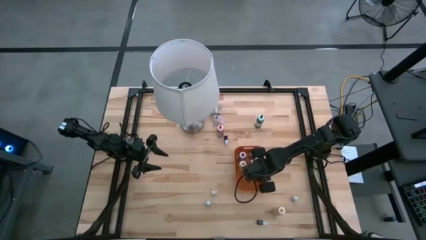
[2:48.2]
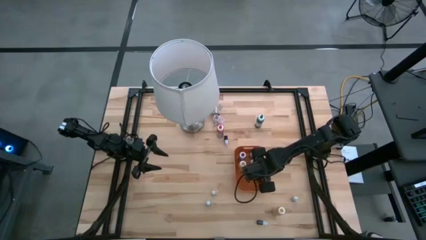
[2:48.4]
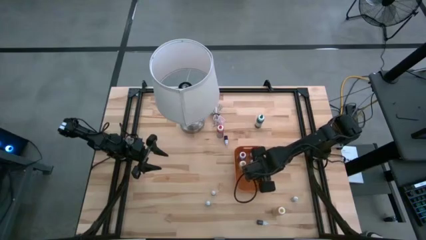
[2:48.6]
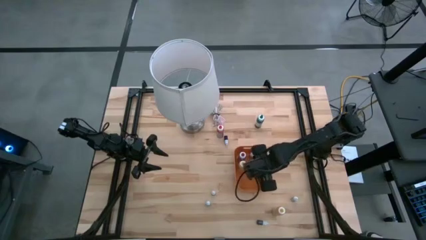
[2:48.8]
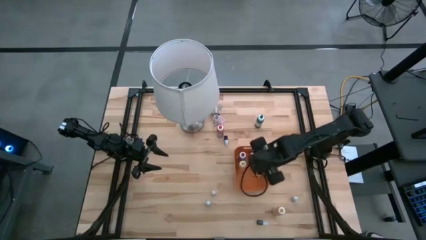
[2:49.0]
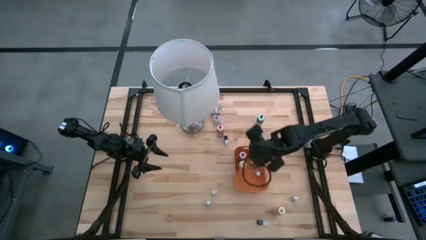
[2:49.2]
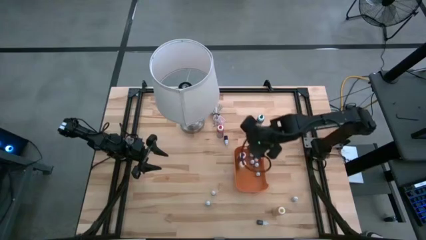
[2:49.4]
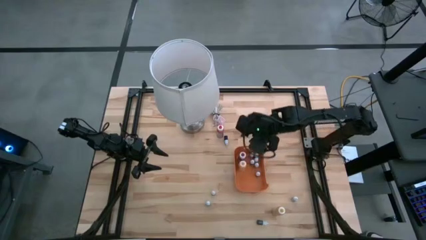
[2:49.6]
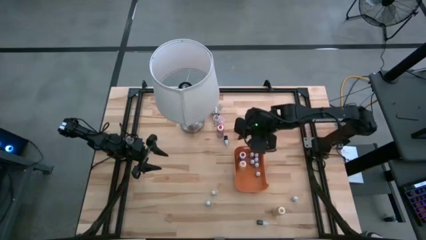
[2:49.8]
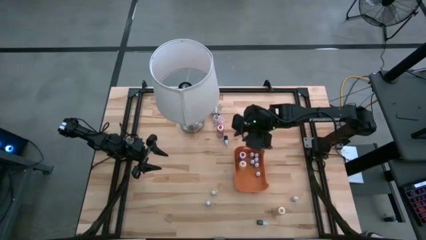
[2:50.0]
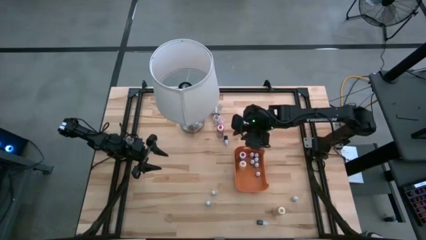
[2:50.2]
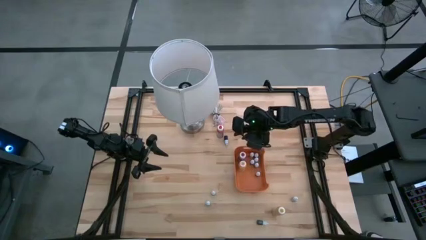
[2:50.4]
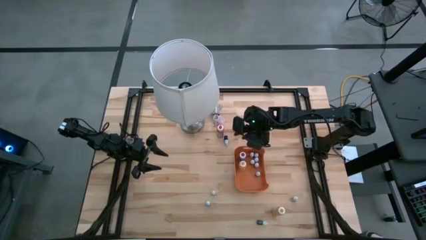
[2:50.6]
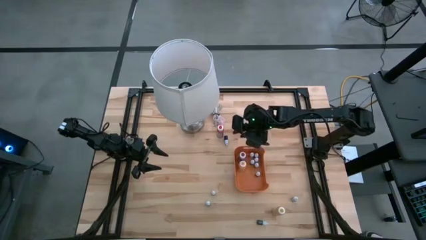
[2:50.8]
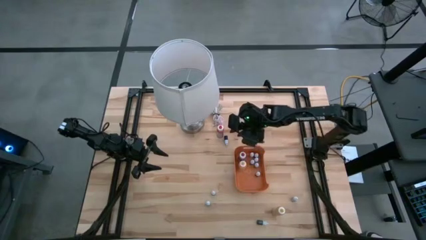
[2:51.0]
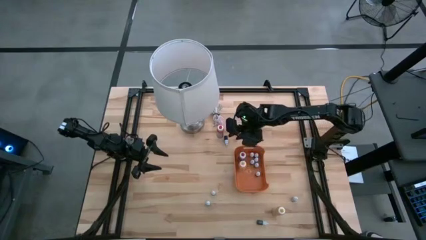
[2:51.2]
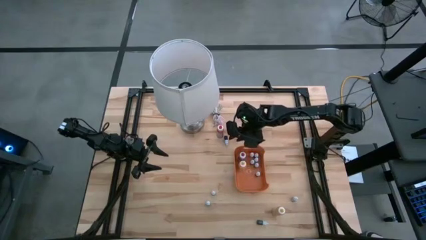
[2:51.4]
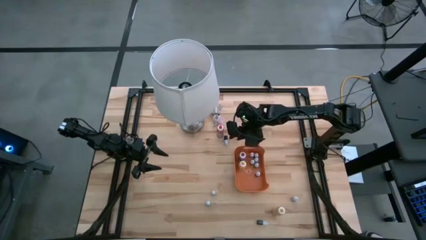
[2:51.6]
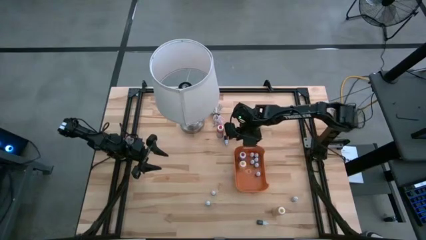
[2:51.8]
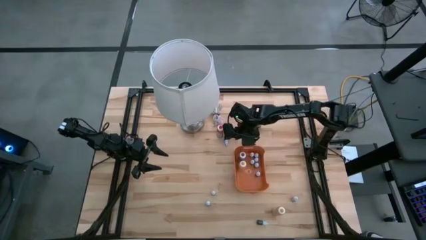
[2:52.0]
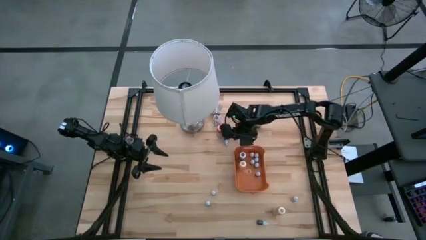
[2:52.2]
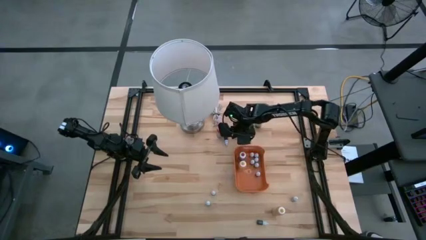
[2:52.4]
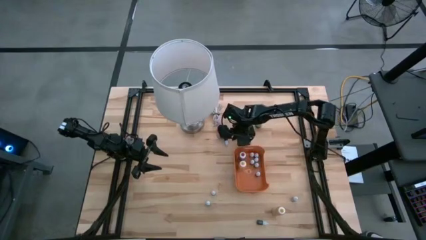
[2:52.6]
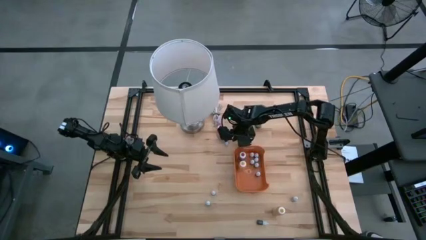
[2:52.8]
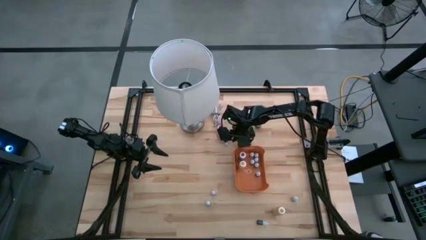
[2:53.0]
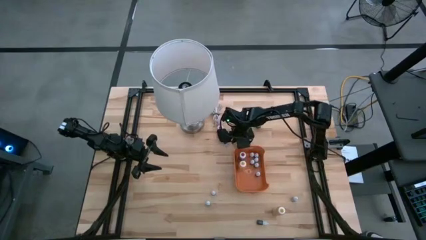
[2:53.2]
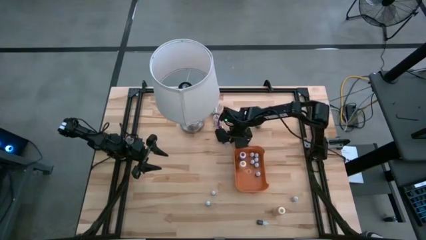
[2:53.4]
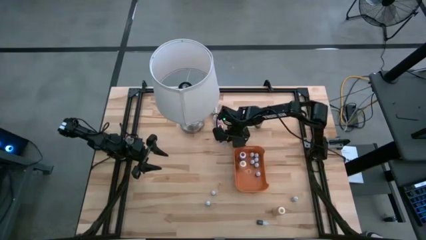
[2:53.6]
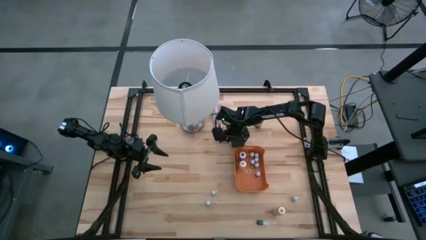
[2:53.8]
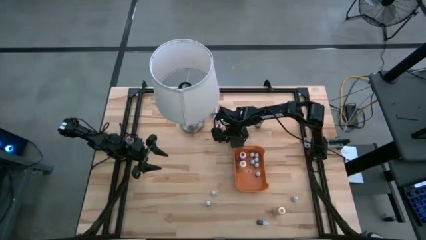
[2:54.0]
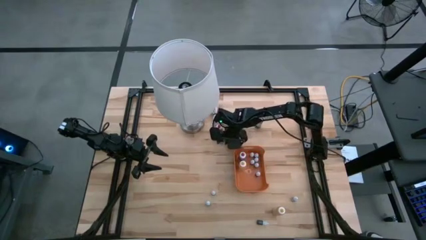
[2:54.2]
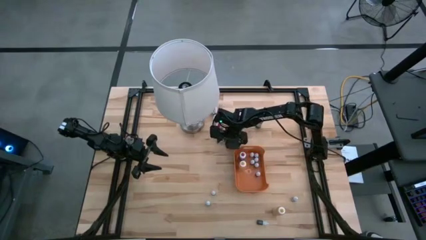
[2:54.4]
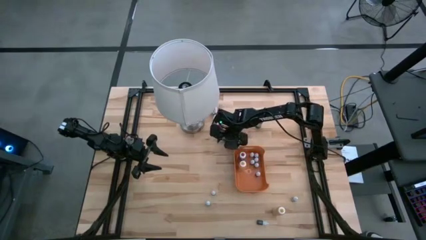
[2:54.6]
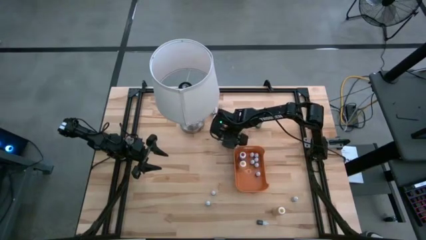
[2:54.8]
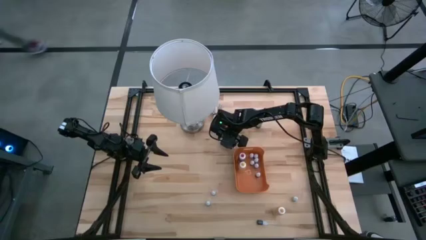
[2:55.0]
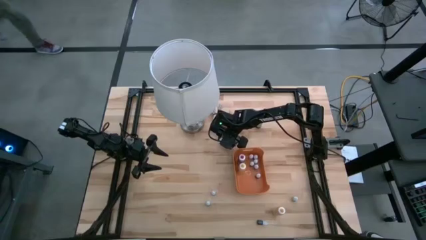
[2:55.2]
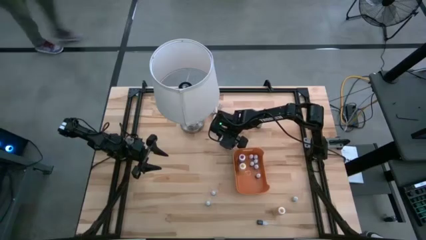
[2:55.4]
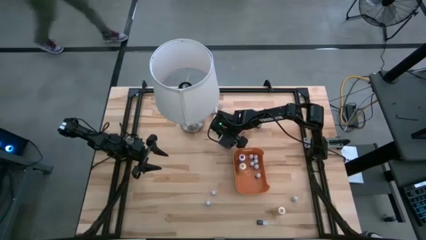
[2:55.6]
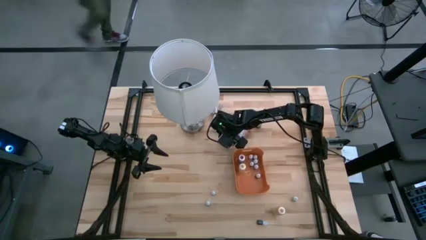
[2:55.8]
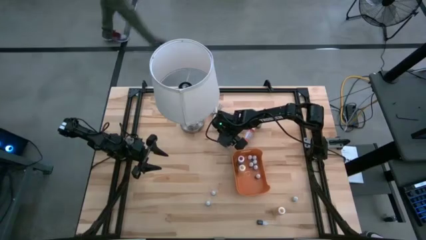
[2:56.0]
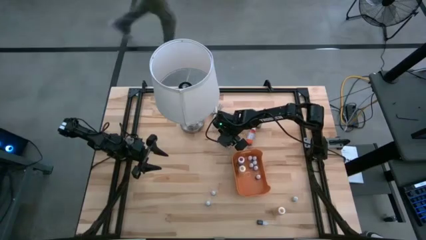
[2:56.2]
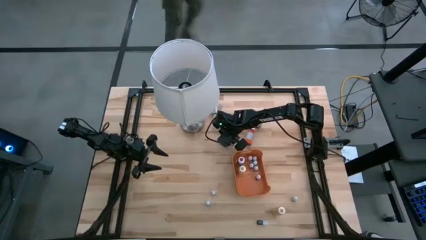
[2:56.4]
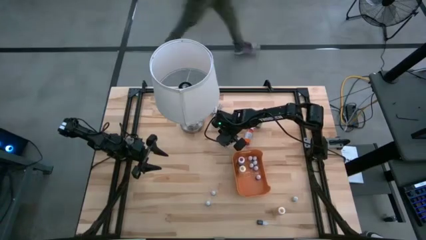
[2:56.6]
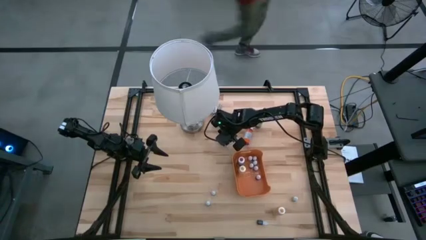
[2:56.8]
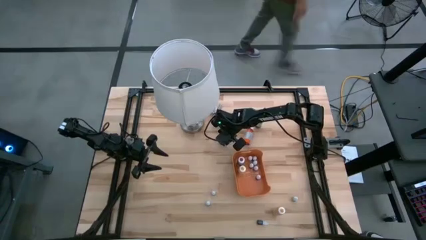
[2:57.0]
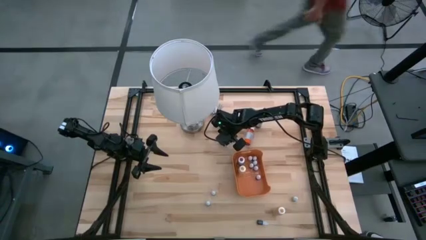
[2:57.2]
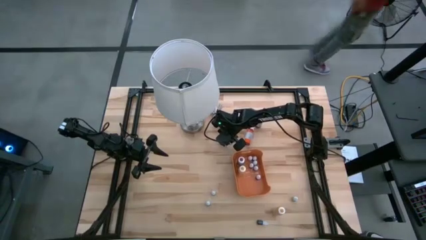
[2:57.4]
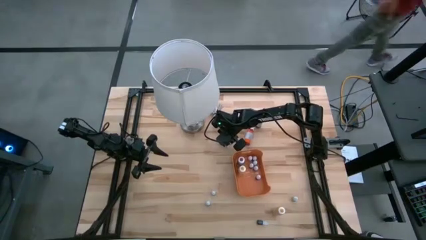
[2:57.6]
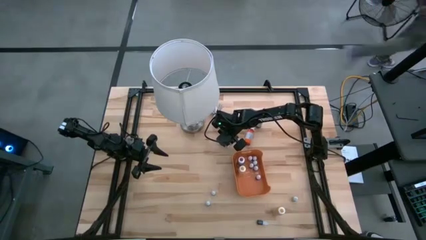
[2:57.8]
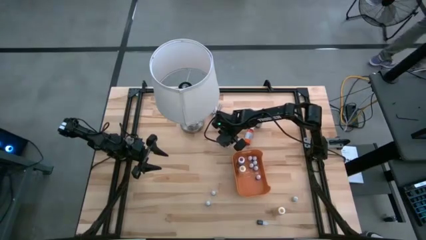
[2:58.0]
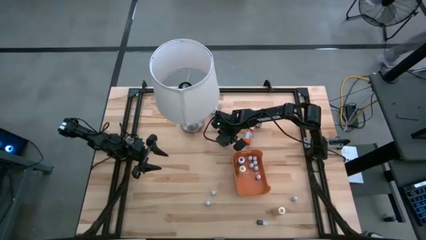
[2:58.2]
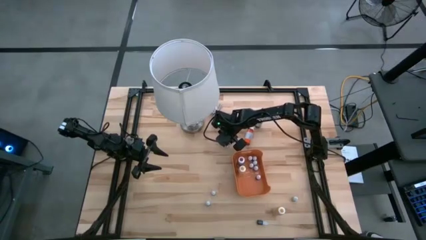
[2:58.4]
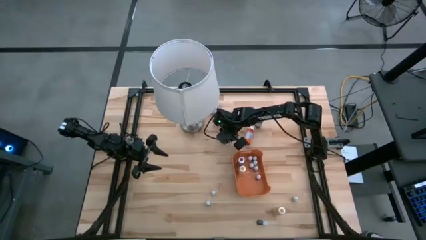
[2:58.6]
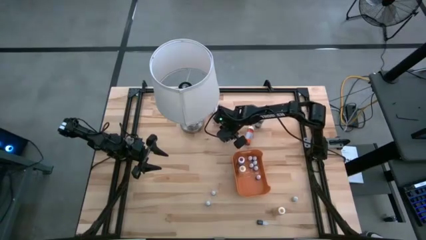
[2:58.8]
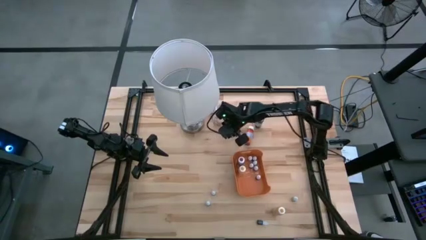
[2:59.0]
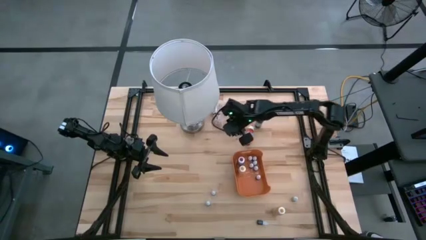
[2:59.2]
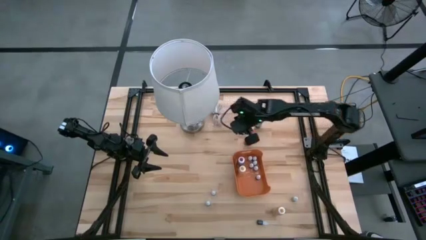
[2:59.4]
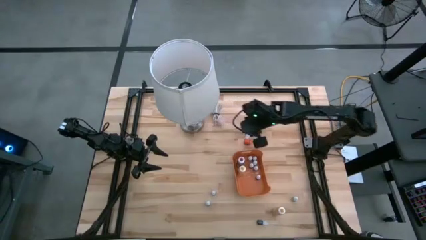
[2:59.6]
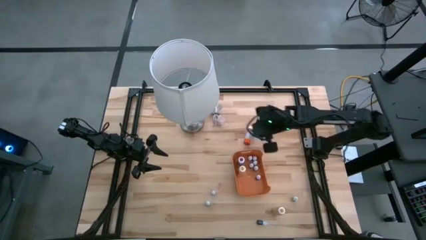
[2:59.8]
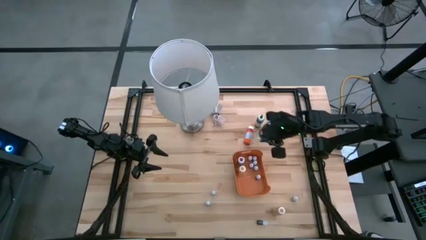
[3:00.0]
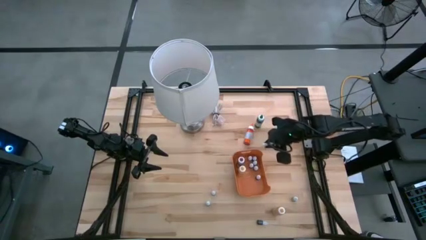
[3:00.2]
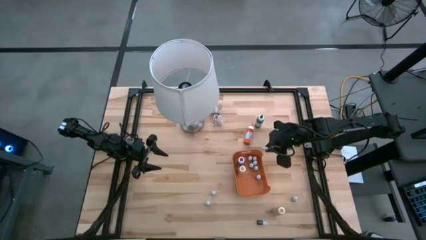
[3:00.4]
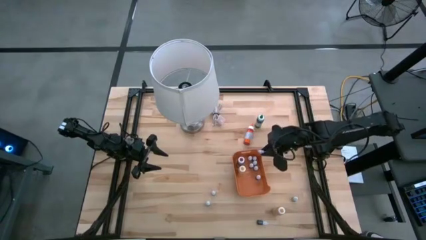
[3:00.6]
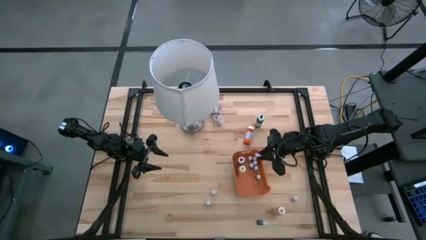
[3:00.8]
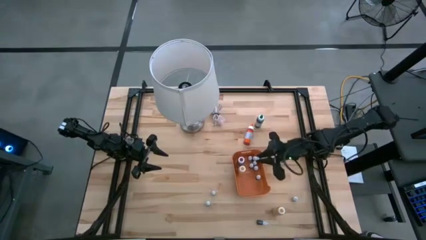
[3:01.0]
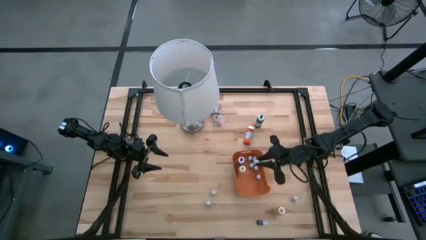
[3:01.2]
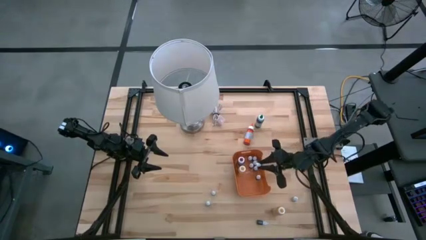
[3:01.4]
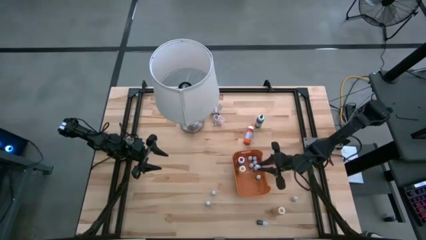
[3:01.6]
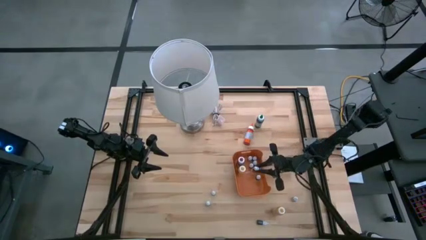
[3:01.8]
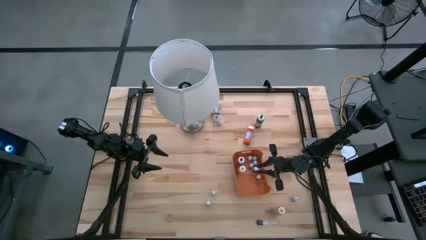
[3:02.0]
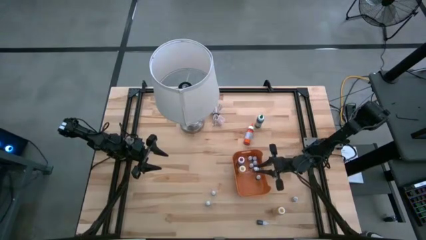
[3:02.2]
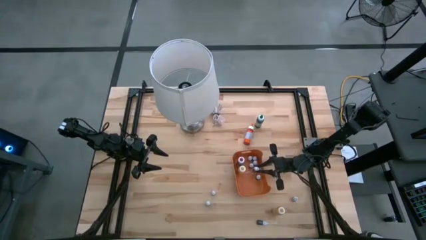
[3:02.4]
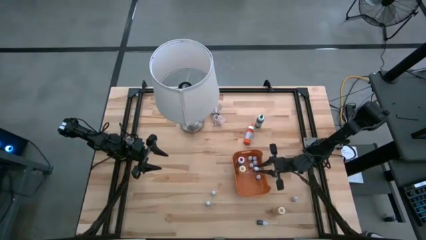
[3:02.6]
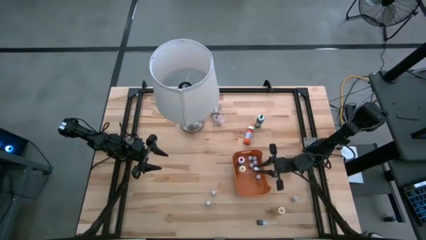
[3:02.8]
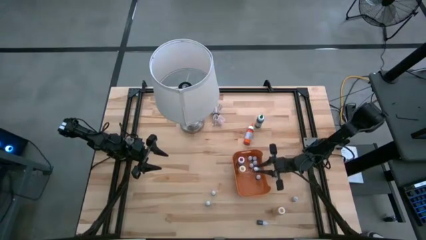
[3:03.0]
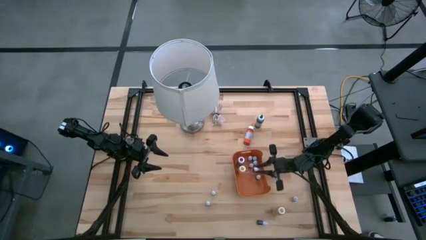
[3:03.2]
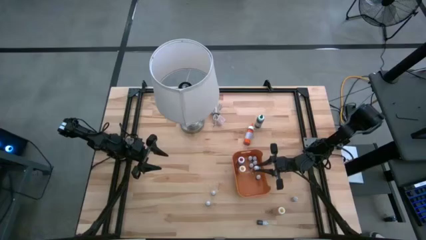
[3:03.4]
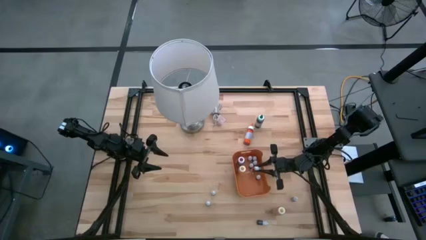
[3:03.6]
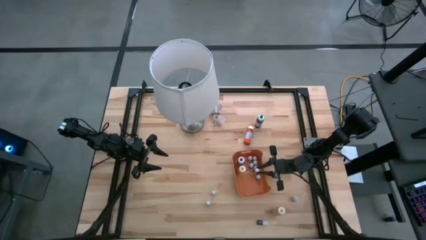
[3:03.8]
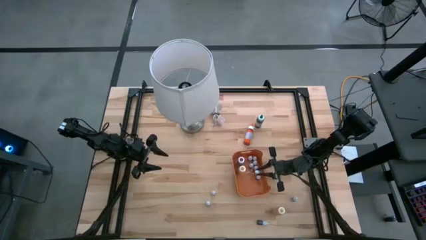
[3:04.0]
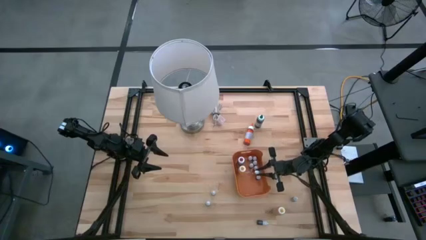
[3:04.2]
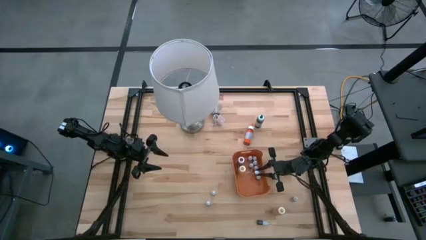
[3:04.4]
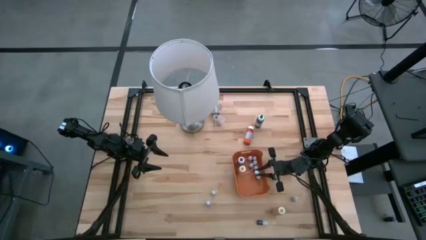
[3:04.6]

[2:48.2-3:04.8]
Task: Pick & Place food coloring
Put the small food coloring bottle into the orange bin
